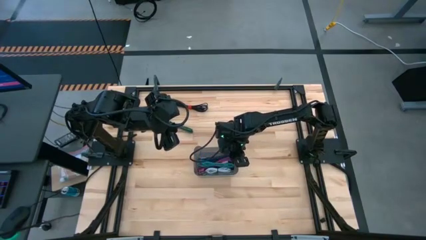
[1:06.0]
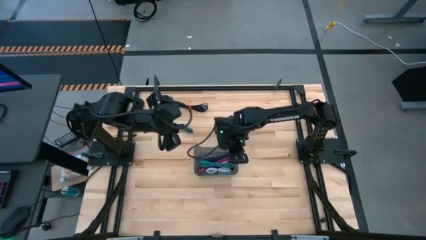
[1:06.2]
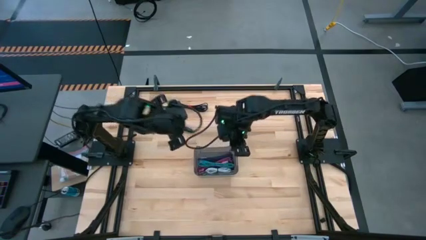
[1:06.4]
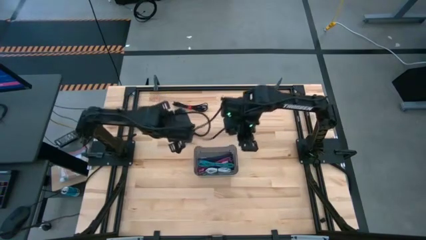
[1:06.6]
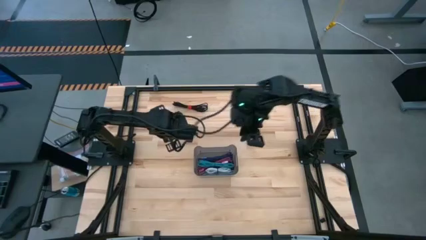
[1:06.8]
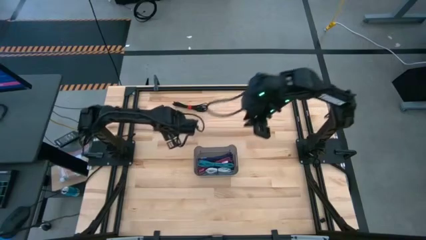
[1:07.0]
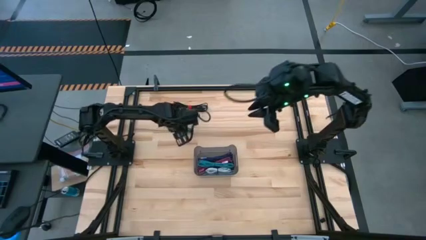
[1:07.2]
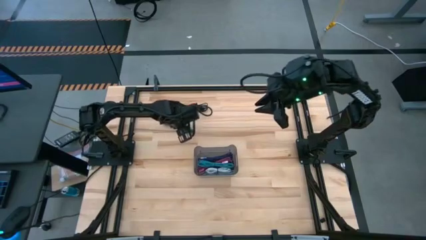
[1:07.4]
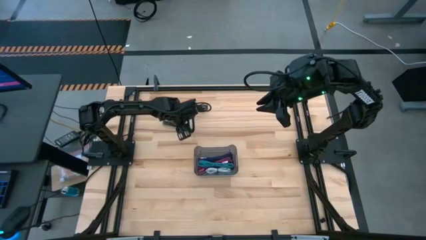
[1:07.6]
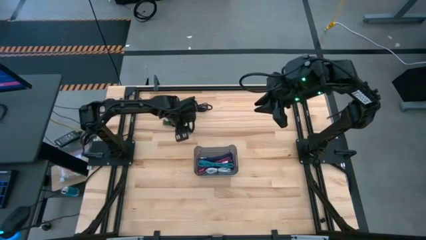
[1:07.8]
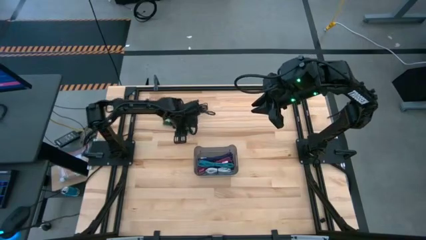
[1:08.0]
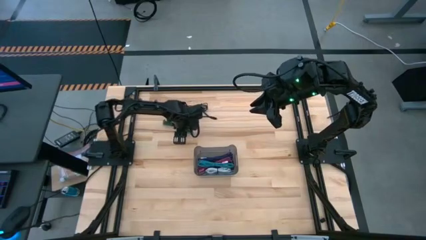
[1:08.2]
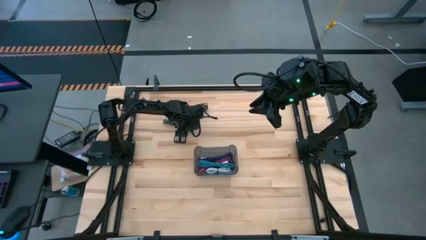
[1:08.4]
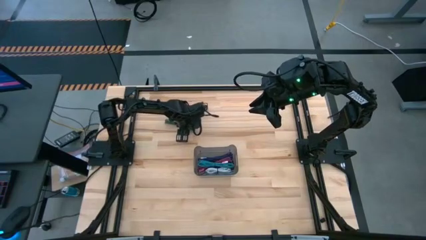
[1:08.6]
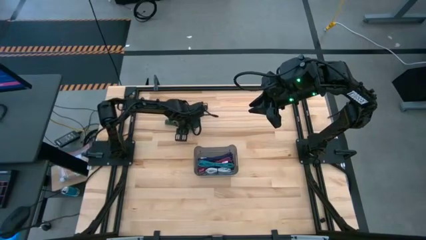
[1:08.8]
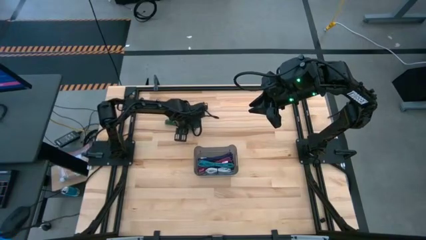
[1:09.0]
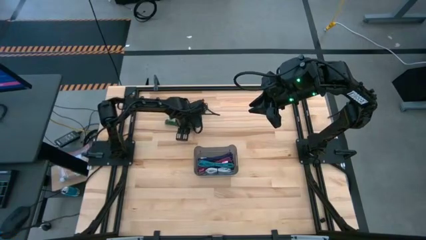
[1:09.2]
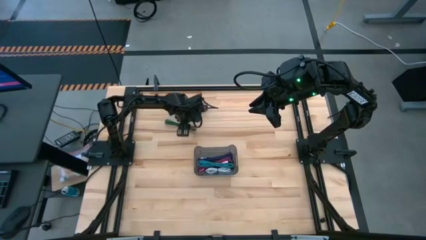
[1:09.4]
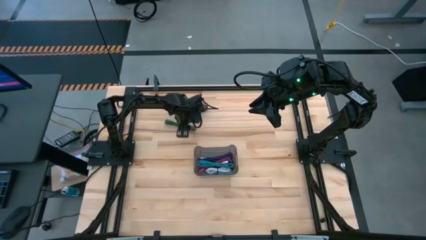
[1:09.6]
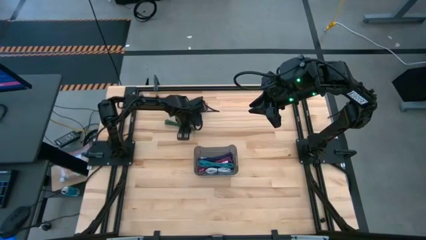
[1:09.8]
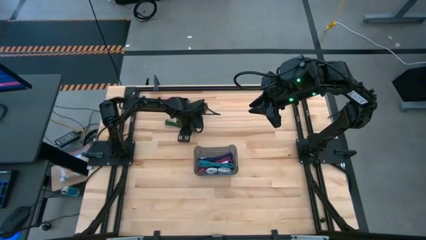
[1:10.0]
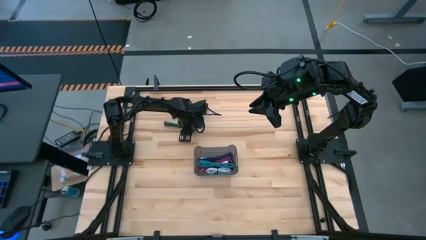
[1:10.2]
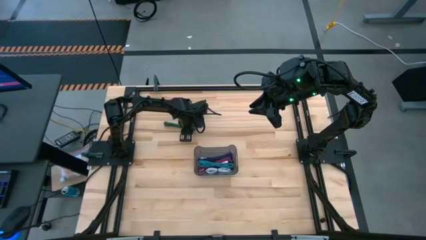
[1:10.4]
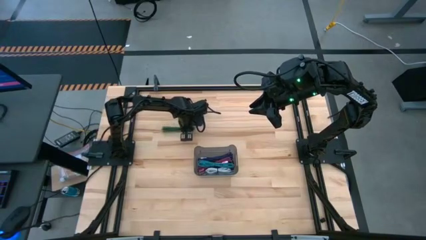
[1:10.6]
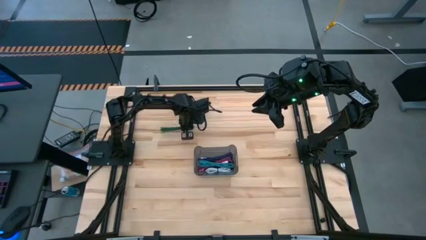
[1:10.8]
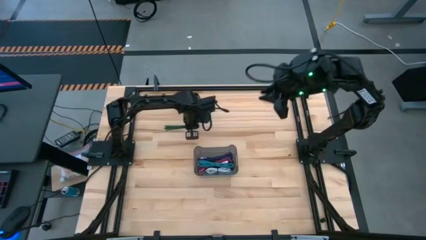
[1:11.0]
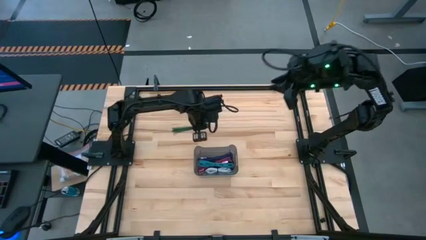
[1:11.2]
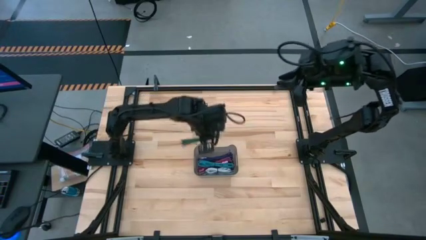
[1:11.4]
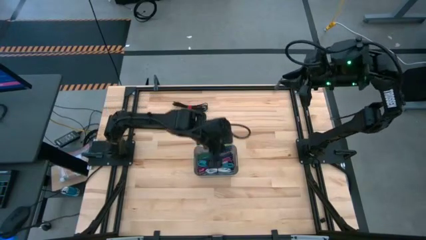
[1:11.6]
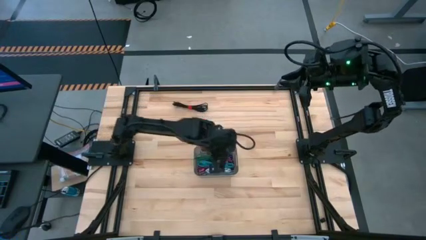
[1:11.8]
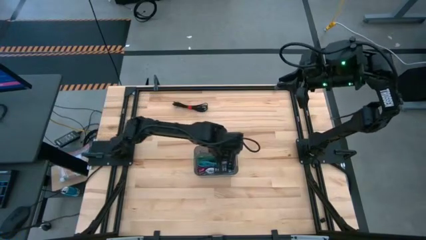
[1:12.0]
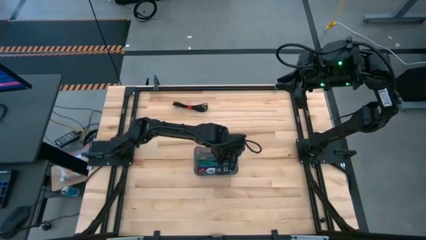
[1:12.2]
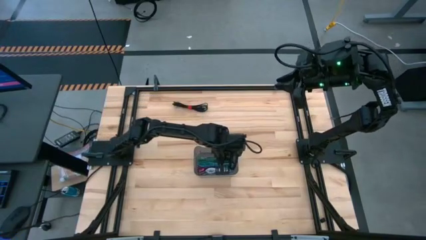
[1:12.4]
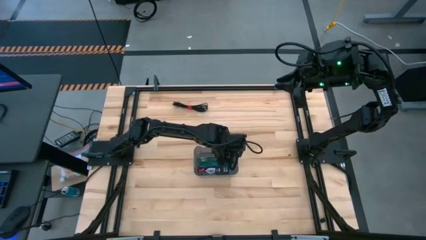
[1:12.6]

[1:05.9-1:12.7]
Task: Pick and place USB-C Cables
Put the green charger cable into the black bin

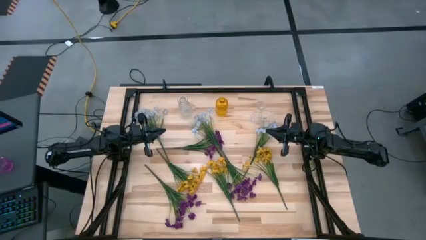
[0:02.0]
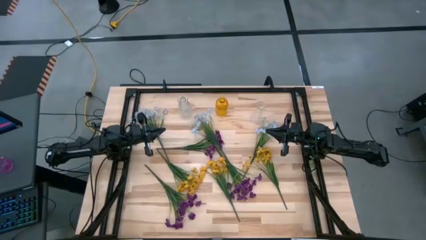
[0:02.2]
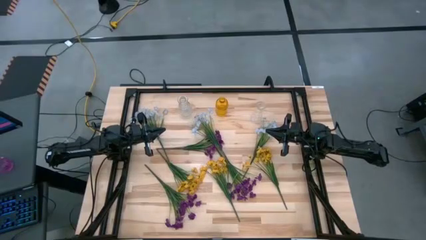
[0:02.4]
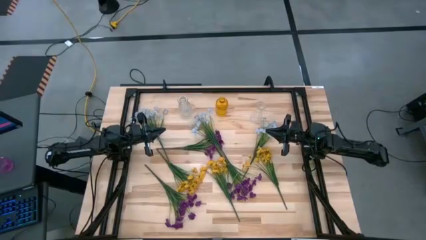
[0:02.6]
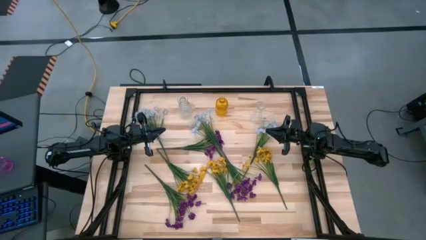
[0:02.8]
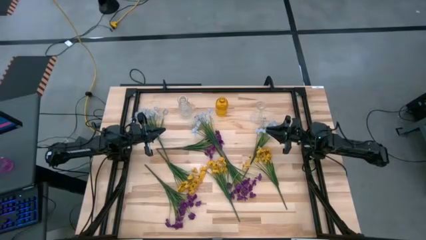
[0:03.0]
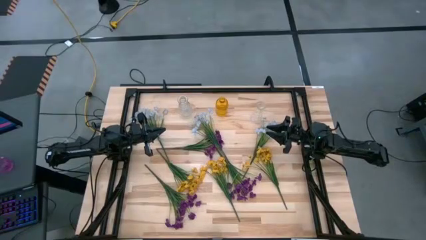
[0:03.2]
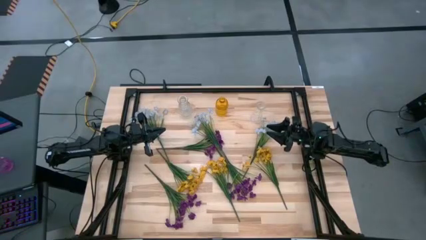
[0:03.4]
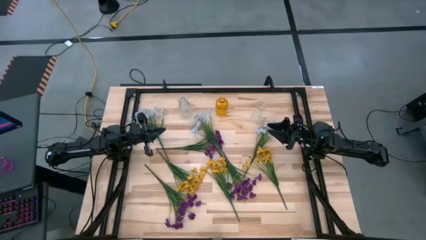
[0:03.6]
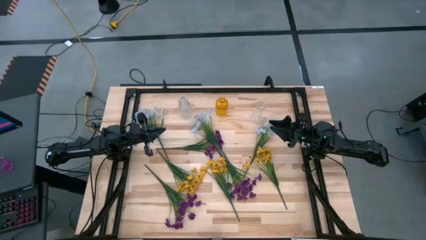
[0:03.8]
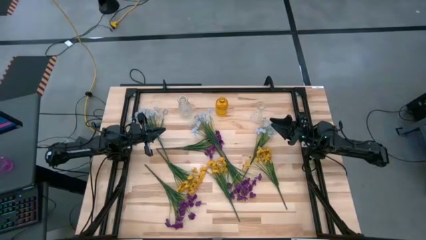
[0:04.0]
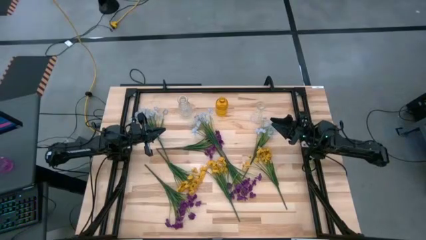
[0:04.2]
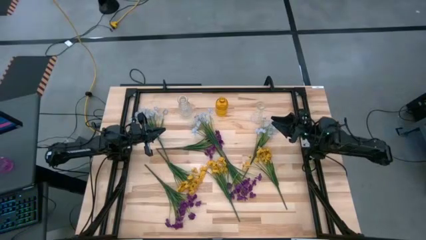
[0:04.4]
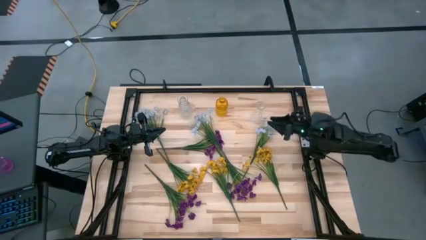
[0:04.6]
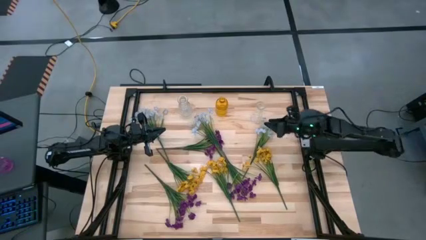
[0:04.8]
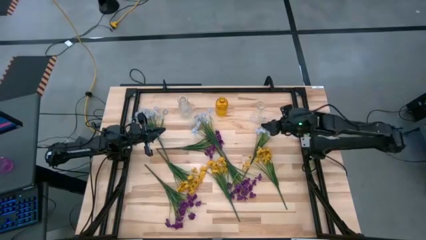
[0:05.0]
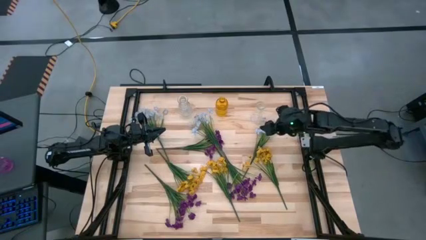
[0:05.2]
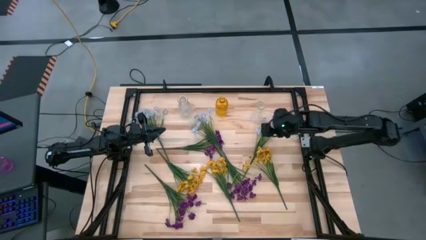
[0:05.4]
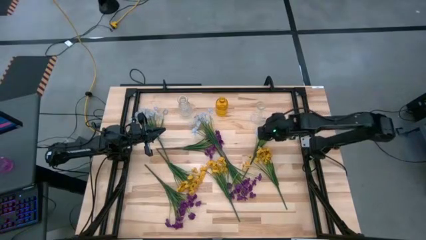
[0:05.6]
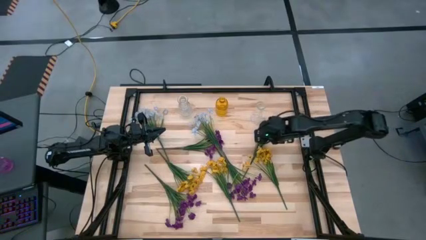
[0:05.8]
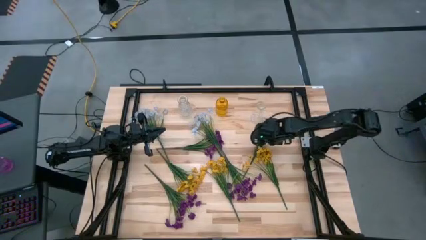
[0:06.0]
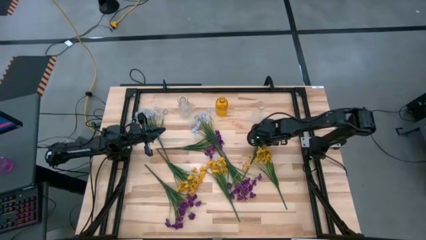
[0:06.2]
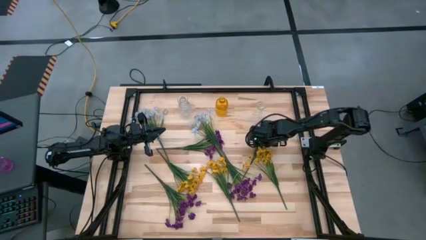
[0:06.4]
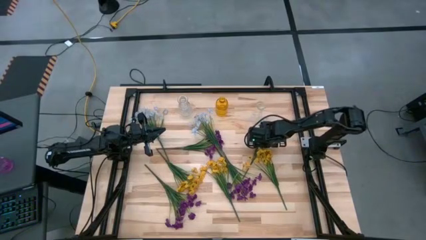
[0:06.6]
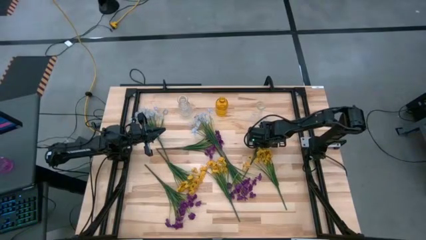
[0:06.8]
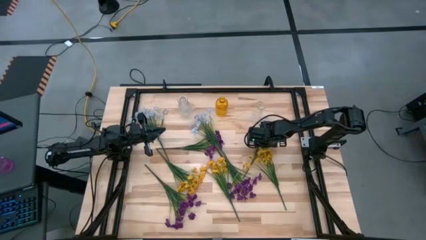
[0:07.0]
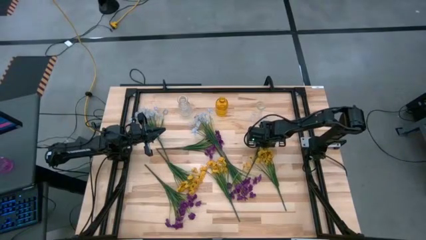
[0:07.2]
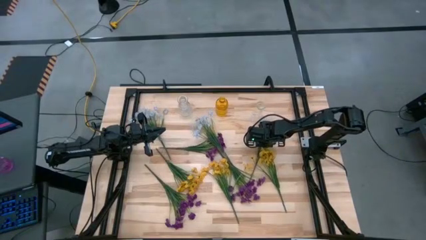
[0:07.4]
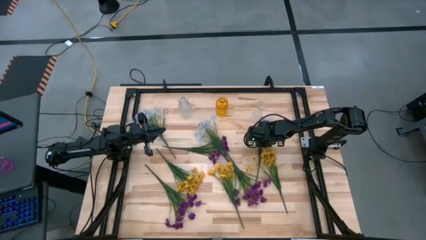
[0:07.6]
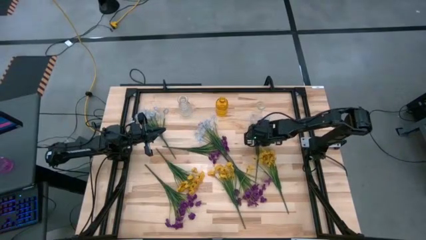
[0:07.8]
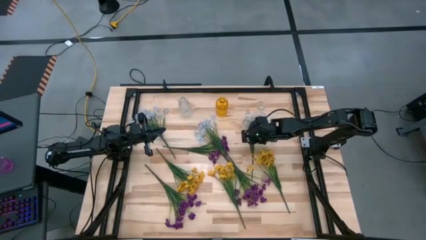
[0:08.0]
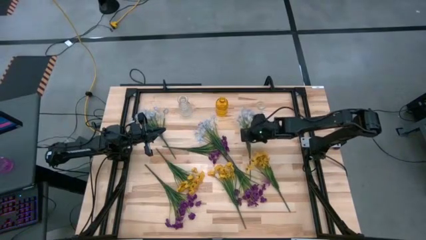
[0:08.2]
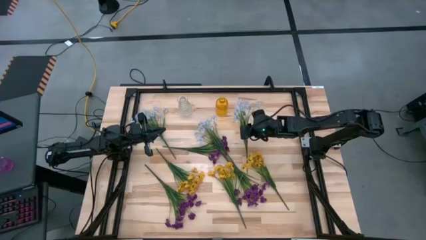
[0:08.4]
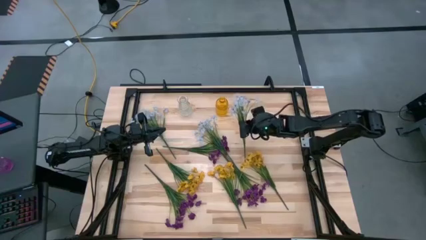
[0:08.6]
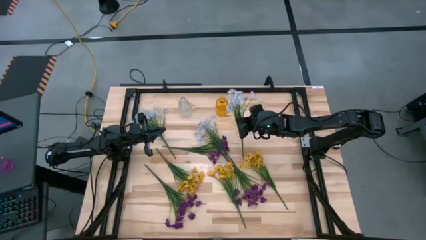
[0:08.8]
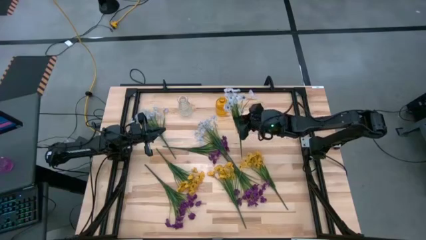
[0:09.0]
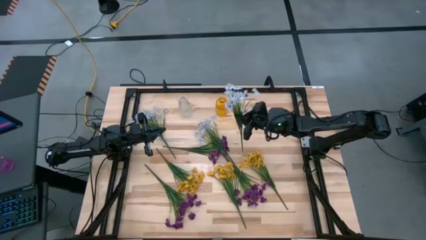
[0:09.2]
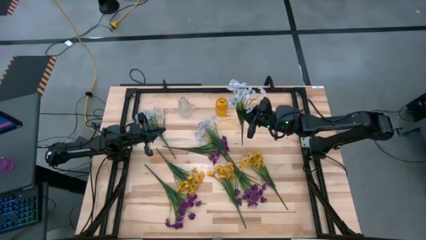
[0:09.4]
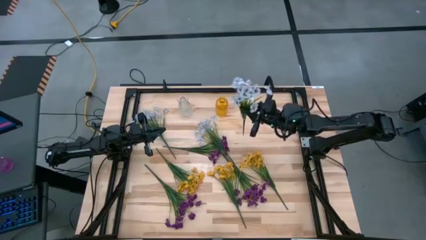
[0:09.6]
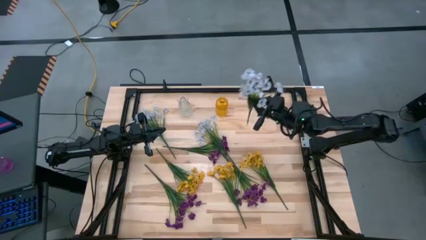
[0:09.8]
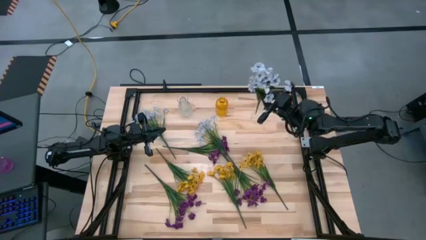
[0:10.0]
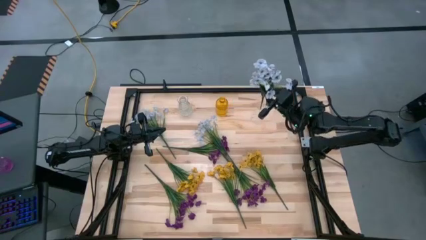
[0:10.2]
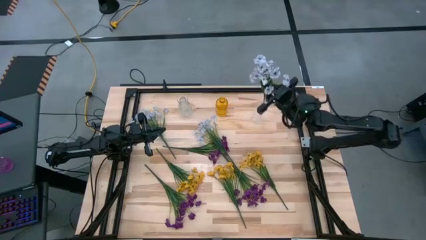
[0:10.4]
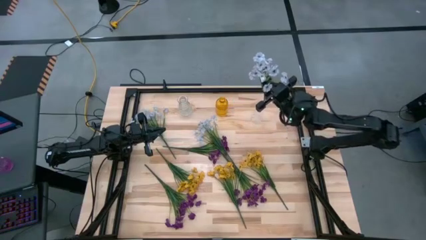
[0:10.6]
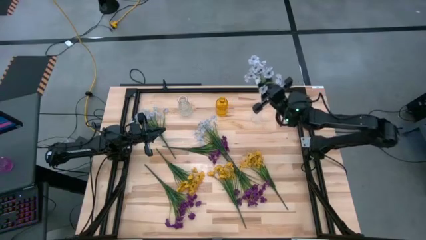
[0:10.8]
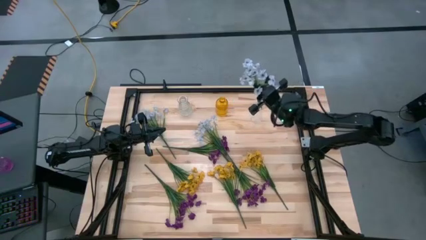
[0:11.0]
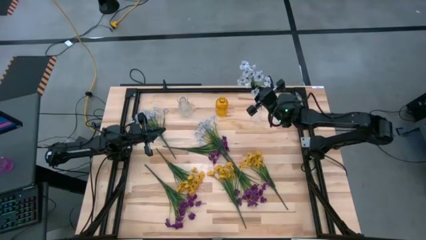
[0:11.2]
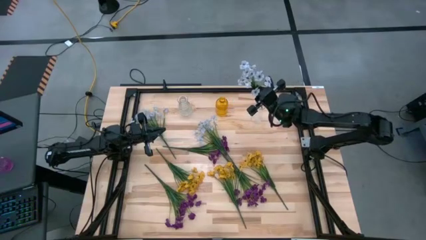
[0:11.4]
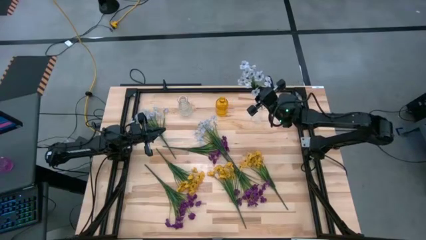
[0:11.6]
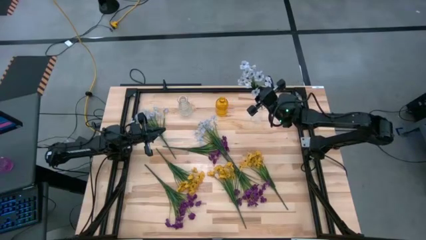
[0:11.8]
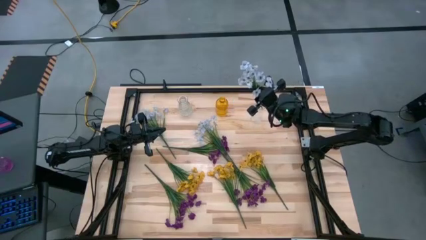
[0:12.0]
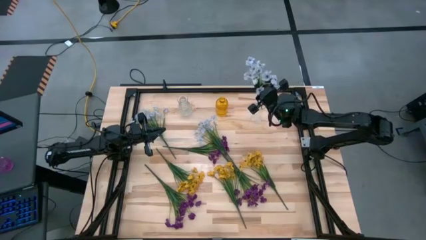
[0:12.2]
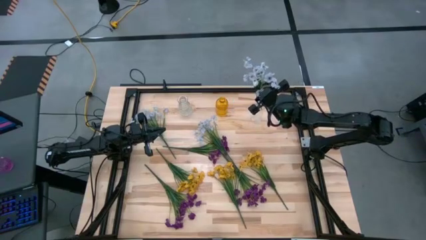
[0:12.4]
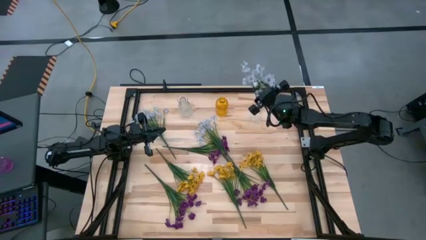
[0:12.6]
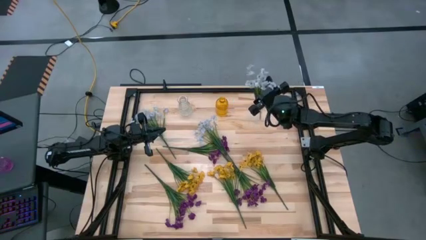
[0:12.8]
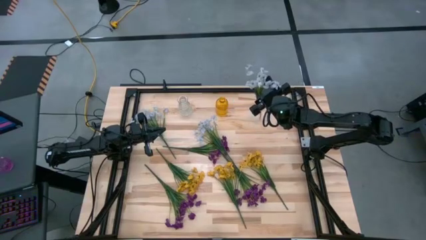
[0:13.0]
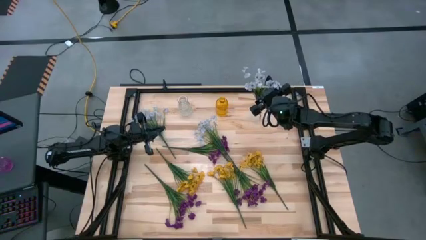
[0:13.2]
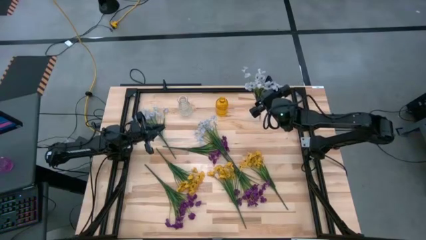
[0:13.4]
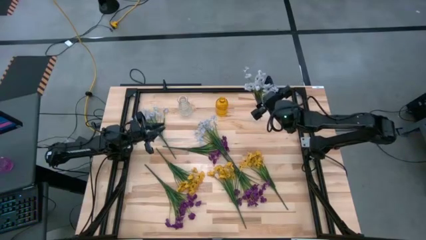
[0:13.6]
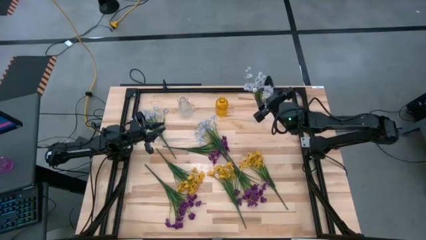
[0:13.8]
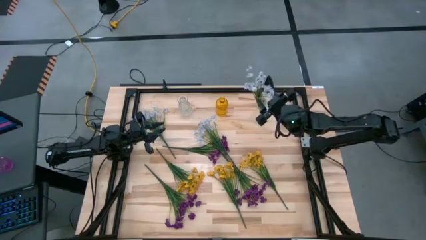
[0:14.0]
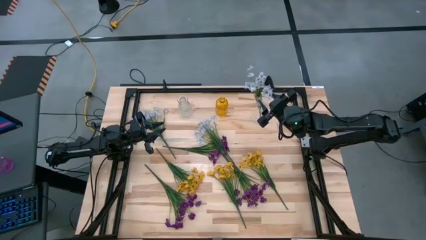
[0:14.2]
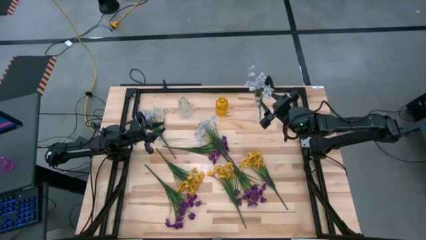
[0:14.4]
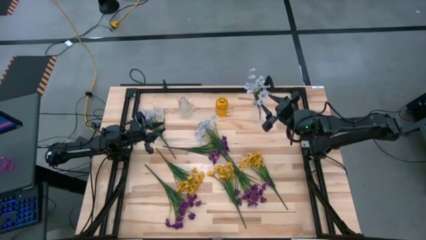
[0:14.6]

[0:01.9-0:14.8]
Task: Sort flowers into vase by color
Put the right white flowers into the right transparent vase
